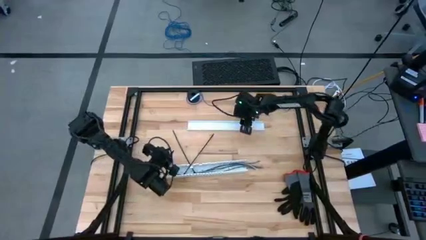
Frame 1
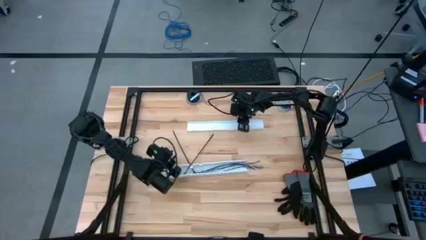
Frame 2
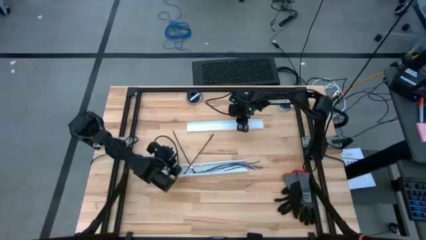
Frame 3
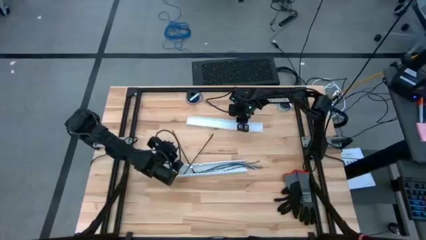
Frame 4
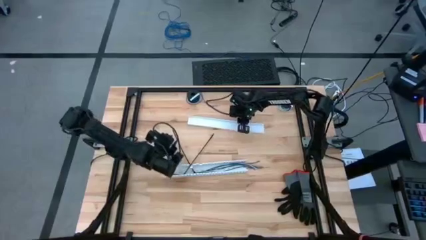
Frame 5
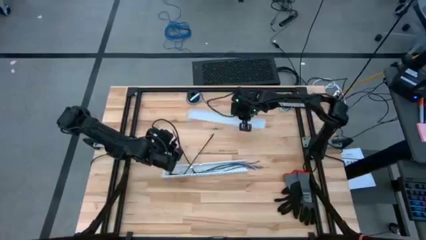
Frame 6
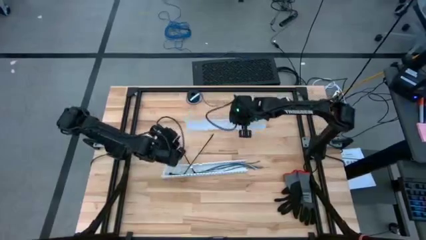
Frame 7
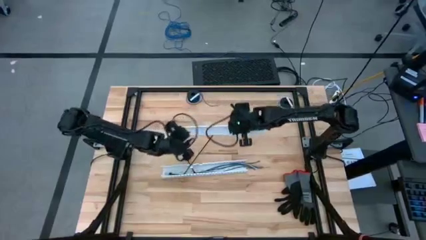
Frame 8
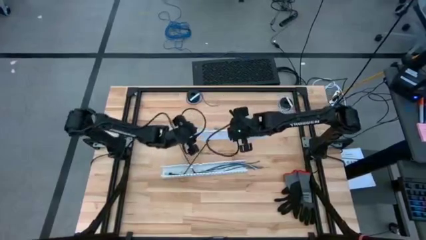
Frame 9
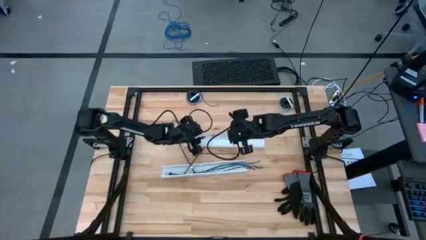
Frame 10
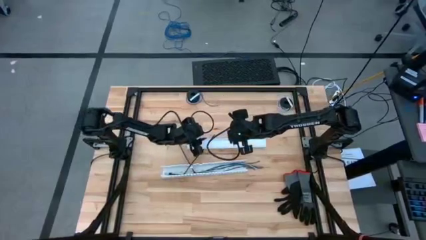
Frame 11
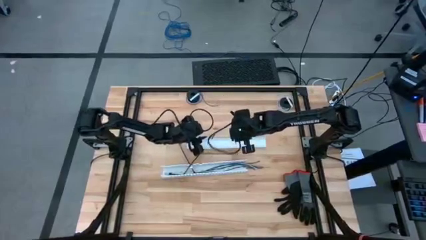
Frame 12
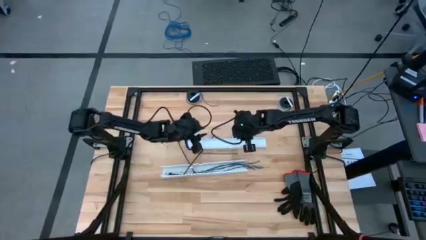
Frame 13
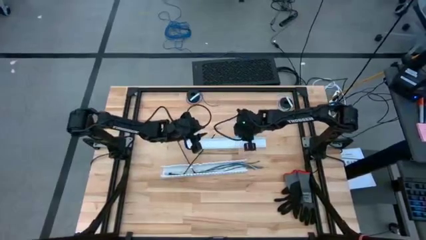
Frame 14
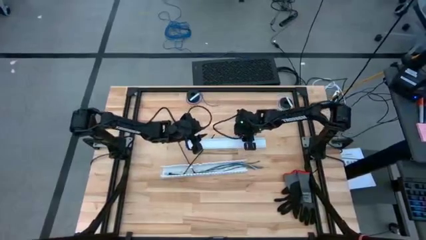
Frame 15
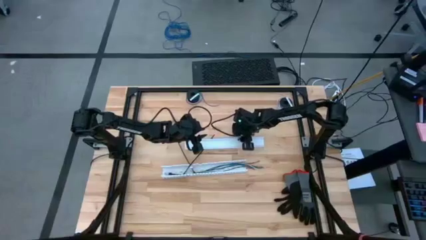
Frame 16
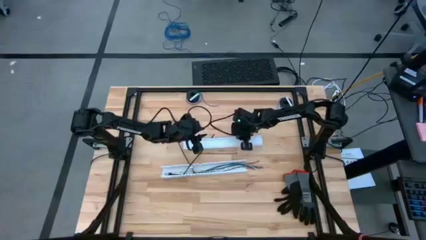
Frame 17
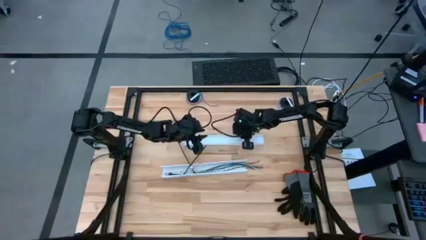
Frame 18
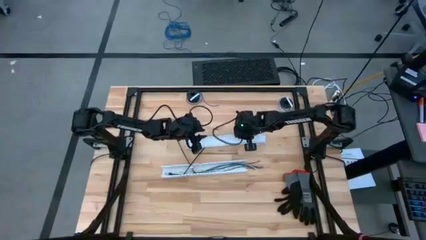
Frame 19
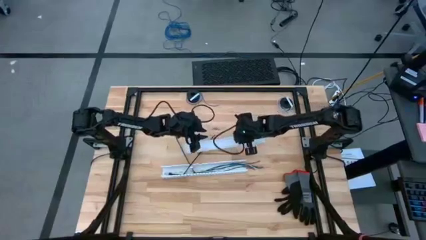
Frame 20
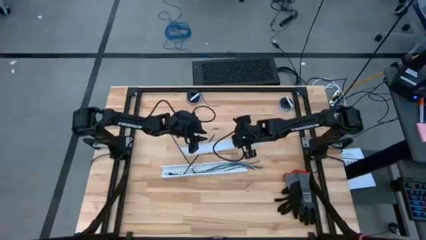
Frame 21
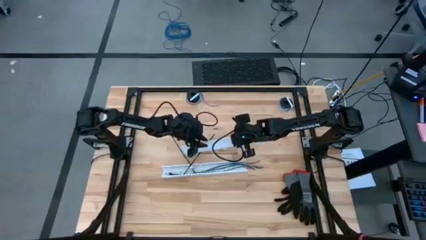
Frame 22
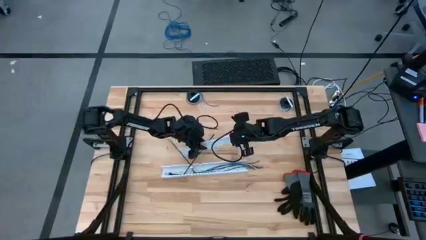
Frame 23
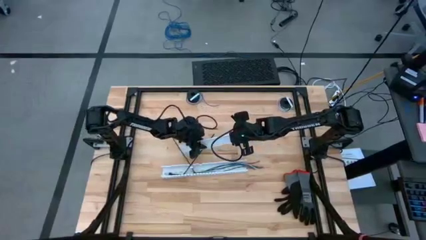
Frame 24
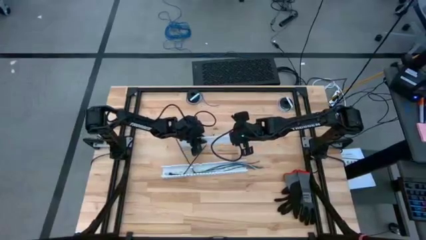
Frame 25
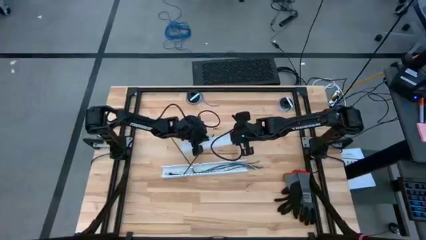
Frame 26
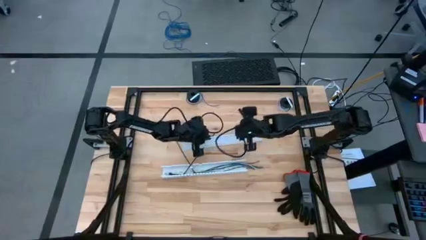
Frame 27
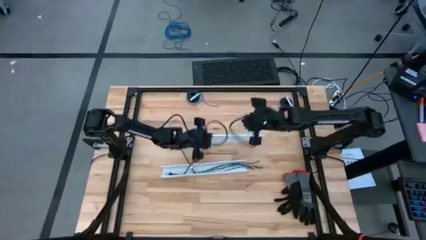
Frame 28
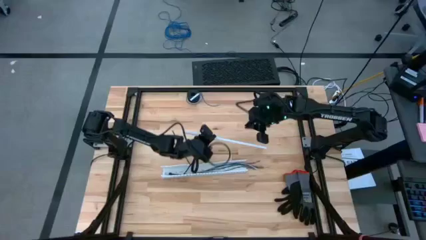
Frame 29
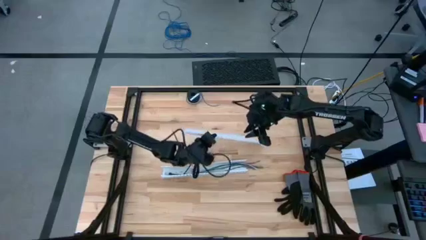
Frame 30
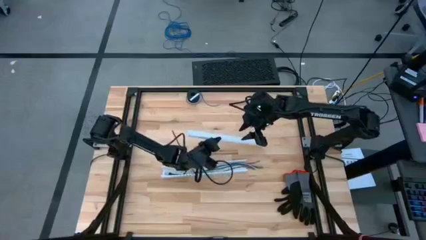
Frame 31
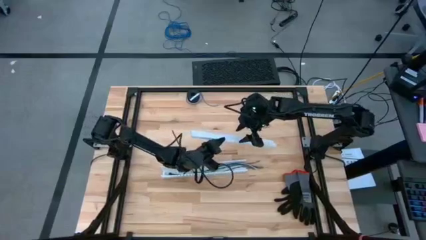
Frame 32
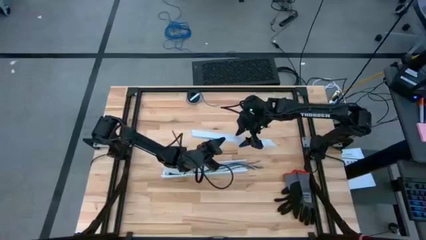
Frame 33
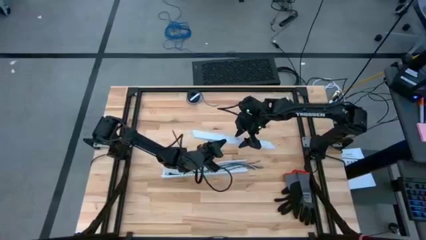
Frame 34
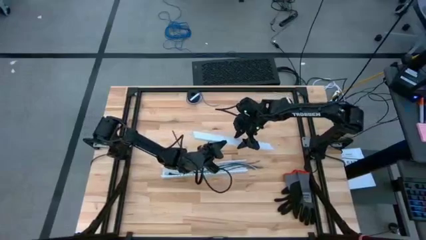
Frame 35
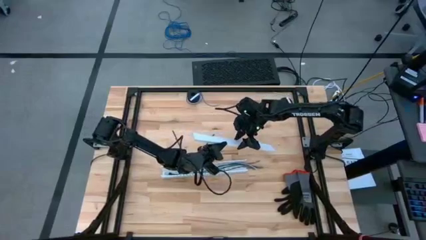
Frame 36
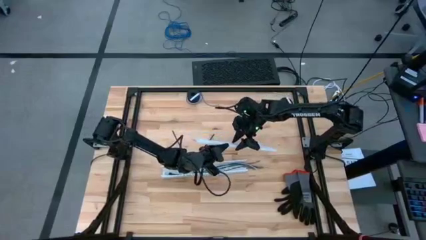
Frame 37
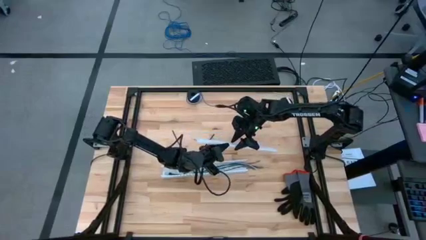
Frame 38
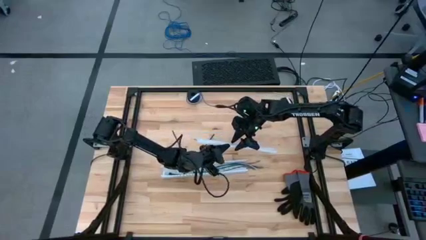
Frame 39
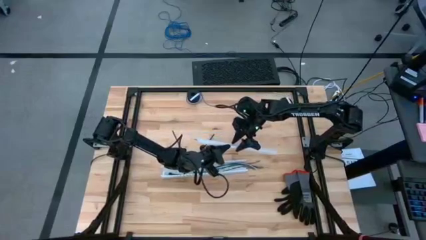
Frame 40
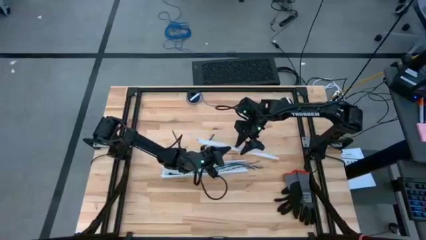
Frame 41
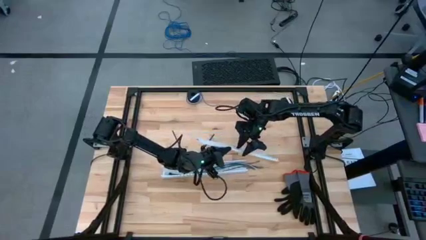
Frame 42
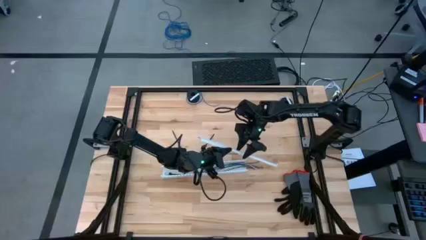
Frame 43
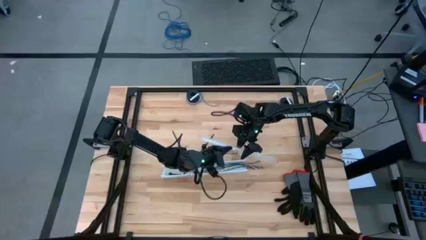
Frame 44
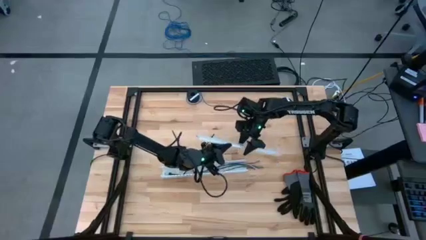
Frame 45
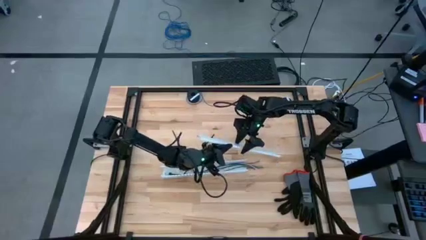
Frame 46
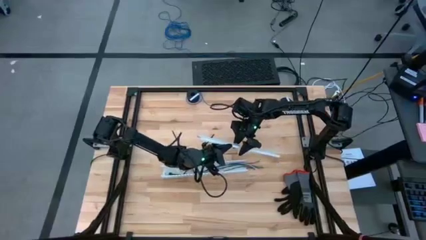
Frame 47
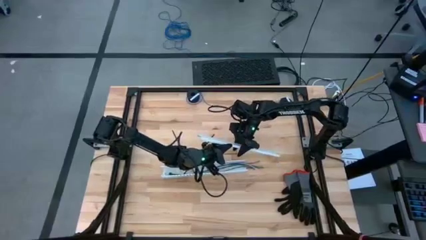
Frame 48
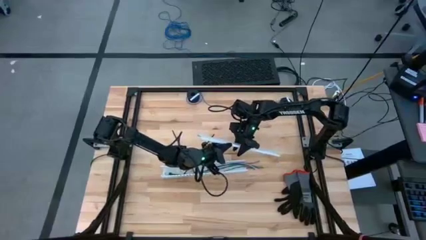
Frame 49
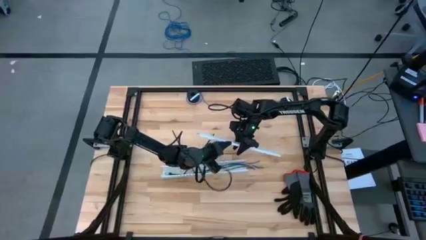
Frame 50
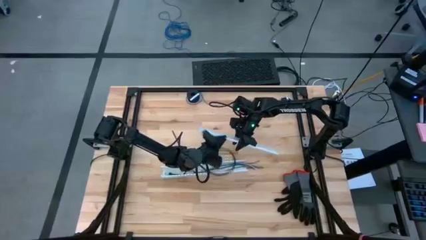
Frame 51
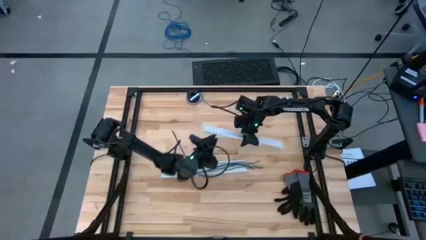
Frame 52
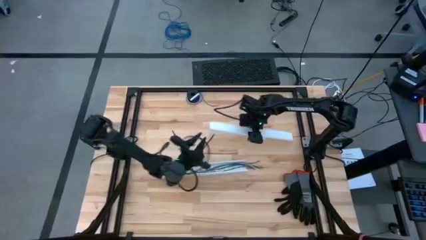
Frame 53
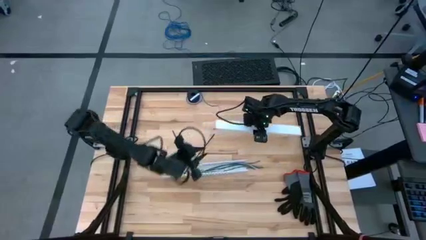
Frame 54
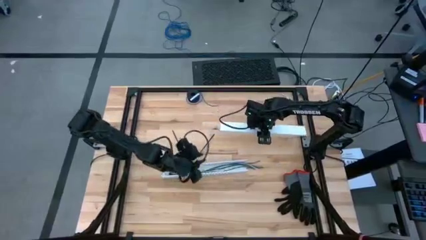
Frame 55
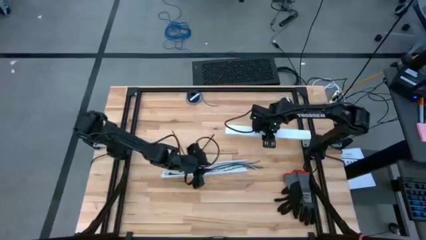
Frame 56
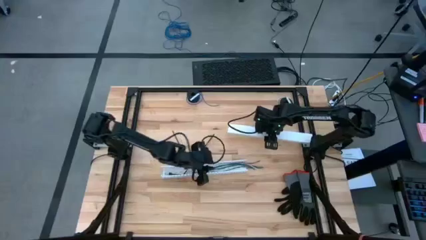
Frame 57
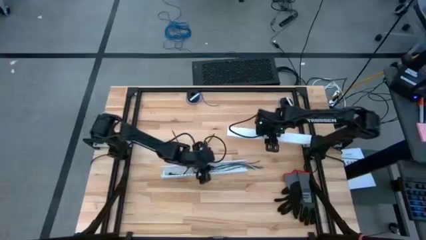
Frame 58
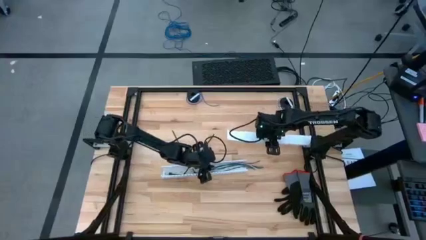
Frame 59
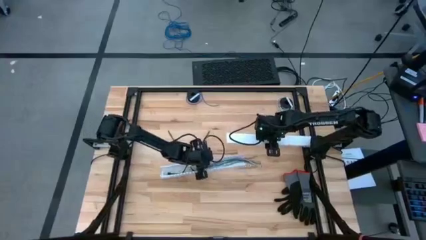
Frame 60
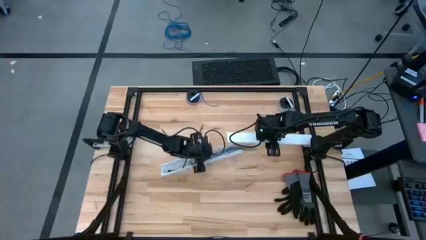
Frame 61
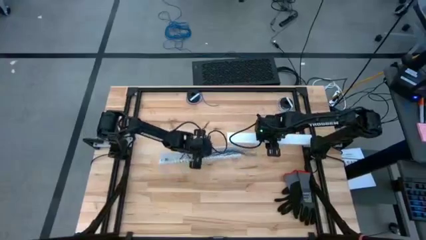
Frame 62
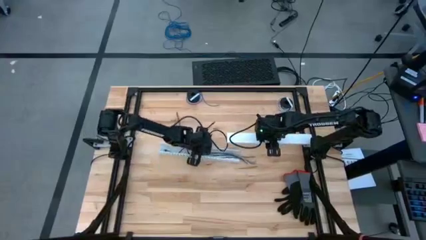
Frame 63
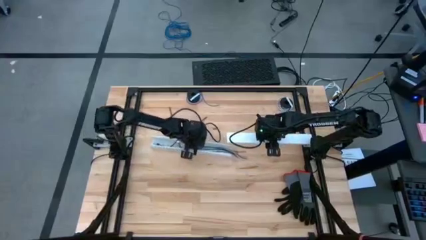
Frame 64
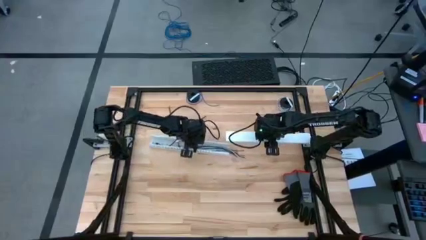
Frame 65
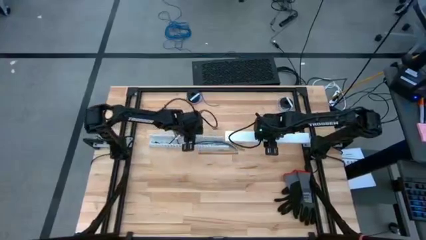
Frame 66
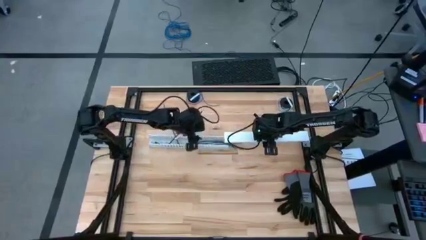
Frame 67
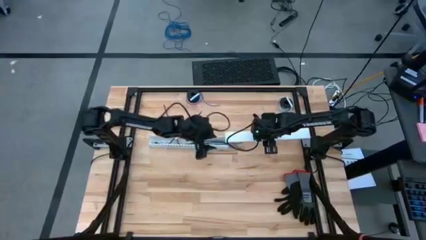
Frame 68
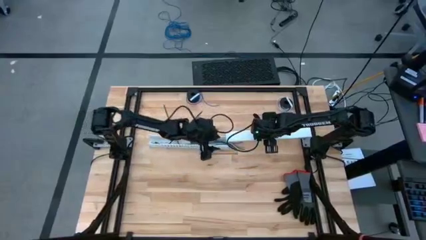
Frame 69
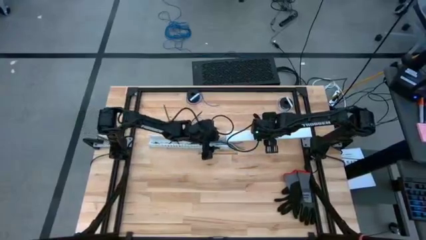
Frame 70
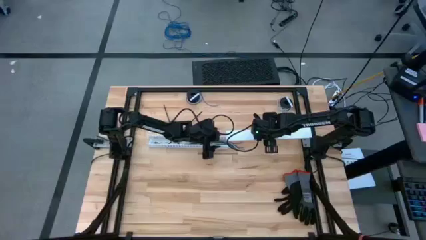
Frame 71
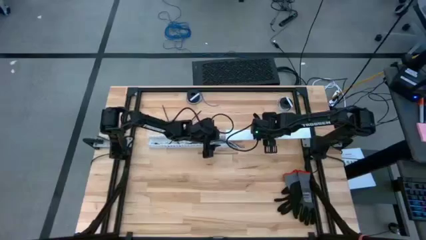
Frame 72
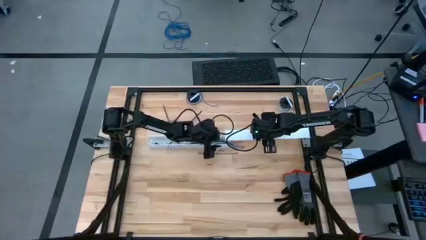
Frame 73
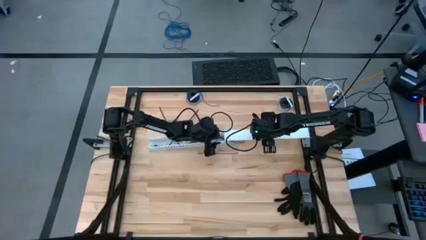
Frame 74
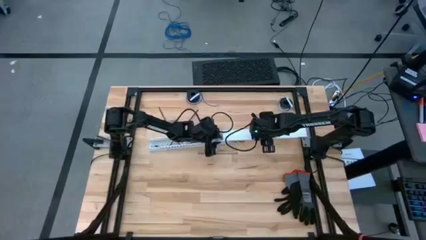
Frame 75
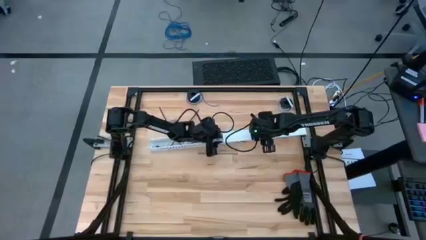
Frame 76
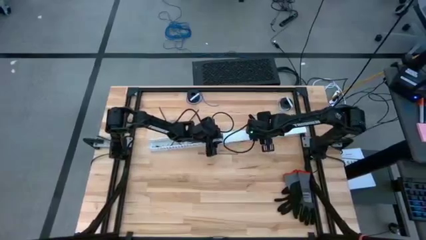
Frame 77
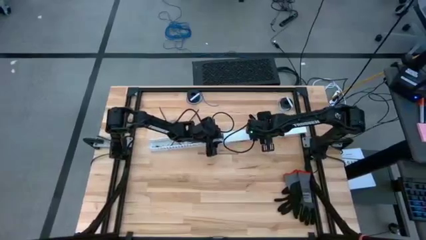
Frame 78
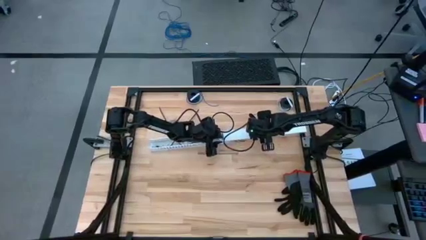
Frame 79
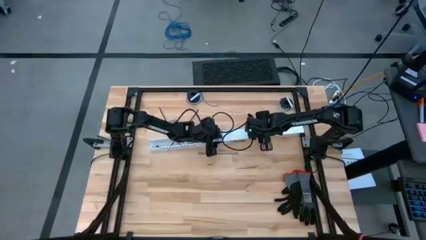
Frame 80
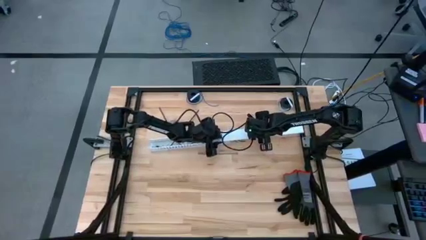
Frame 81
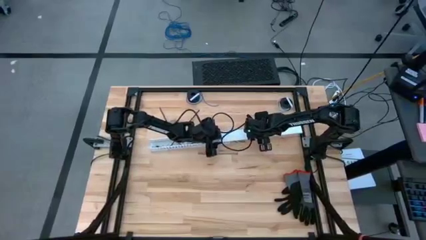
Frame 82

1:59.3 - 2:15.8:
Task: Ziptie cables
Close the white cable duct tray the with white cable cover
